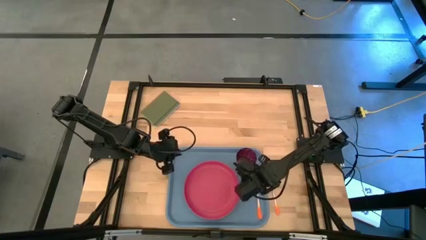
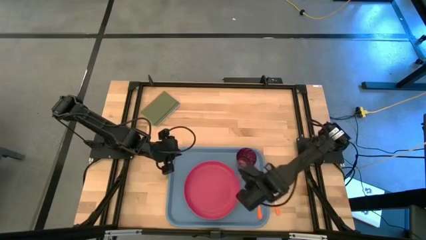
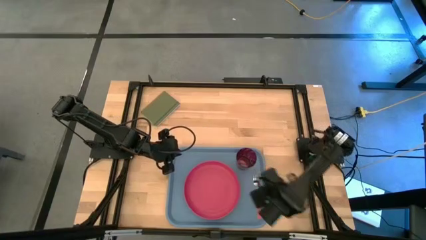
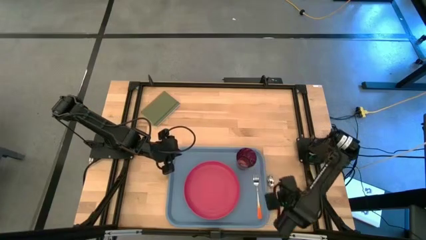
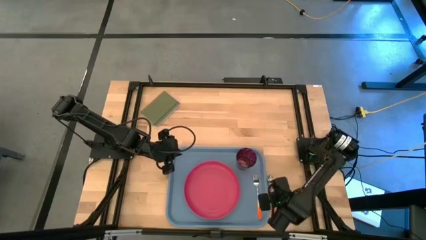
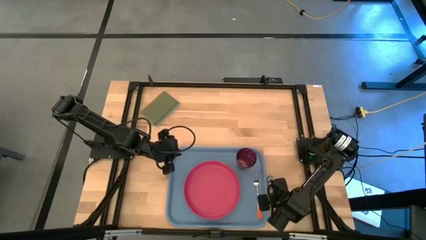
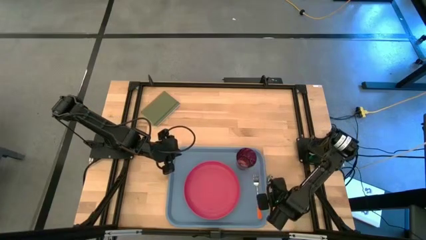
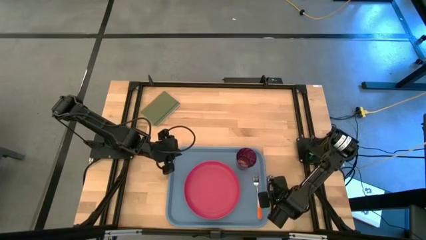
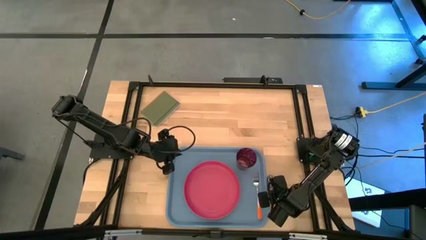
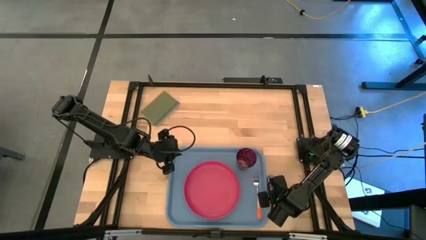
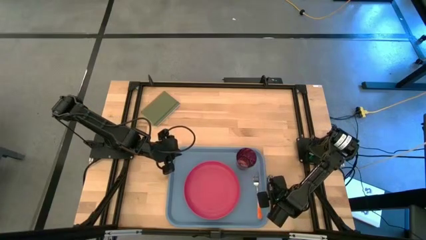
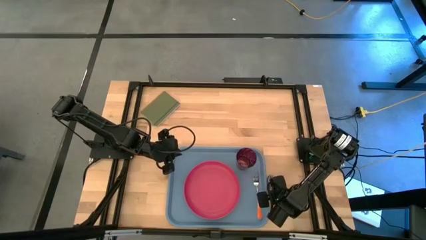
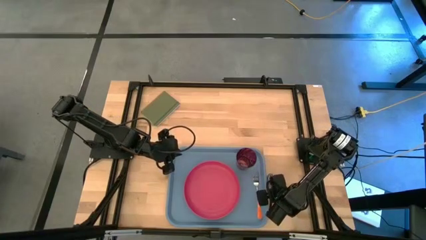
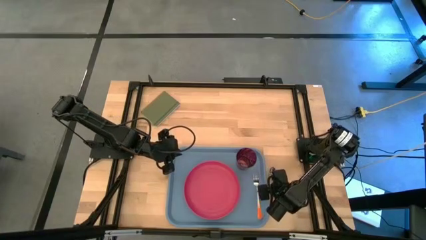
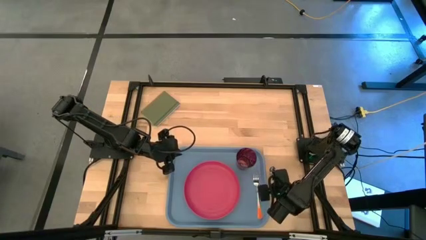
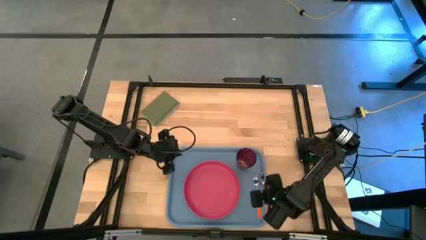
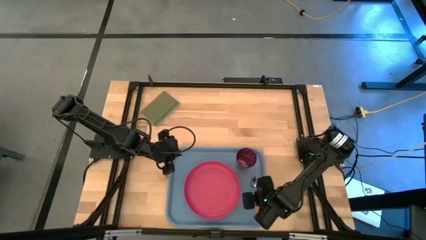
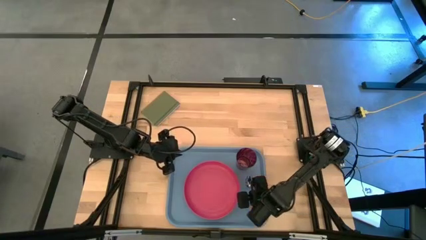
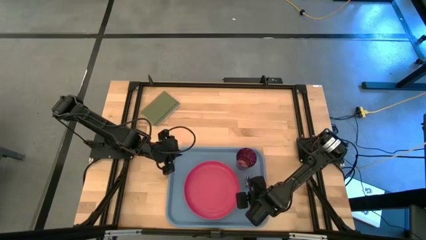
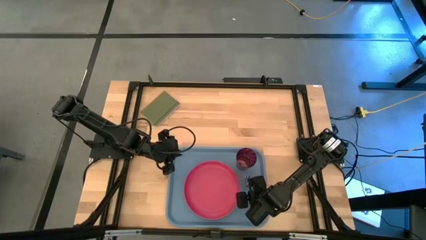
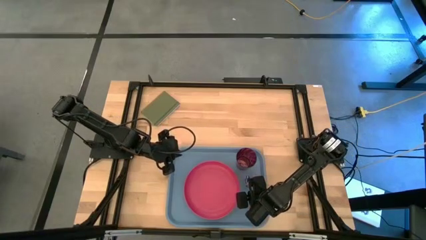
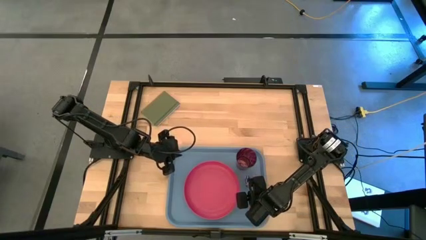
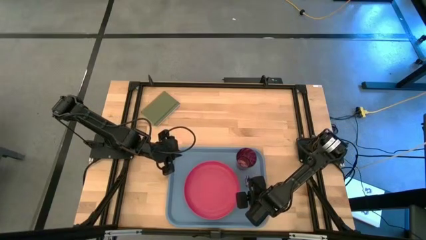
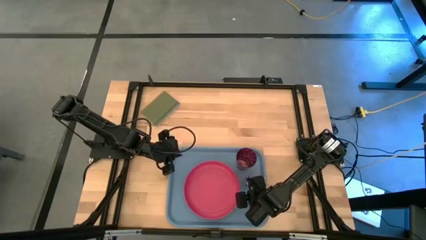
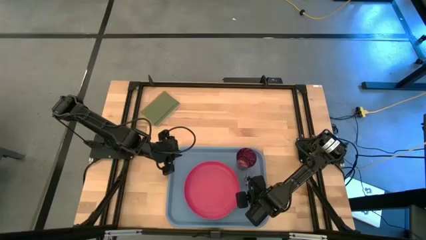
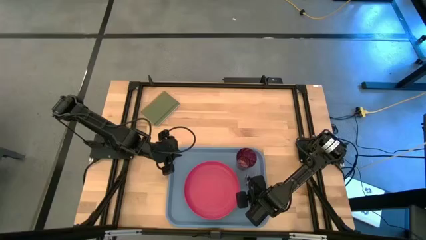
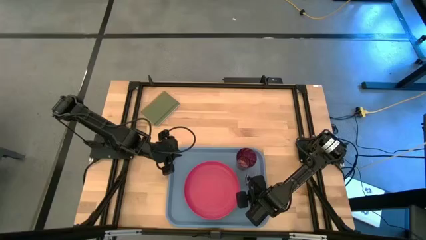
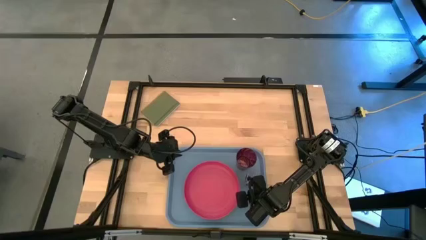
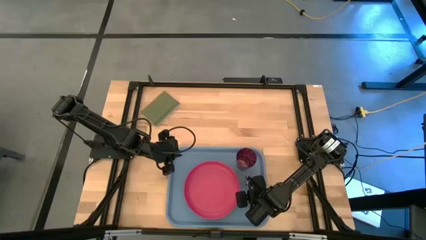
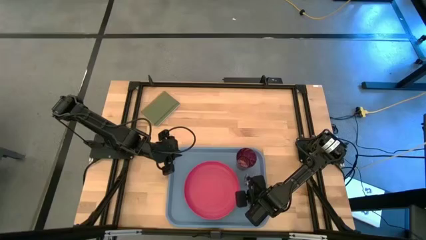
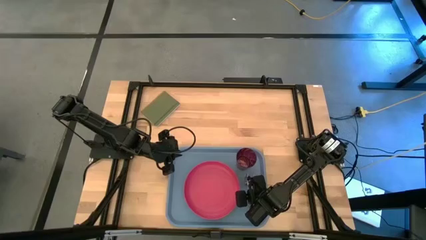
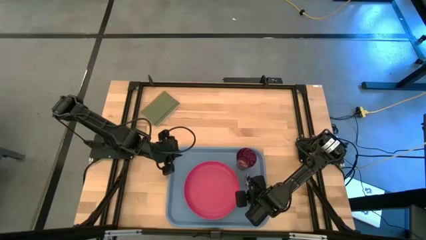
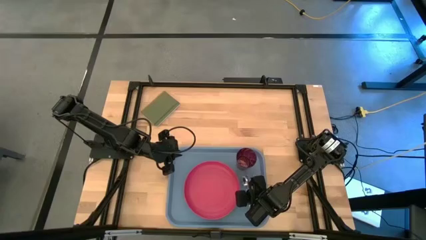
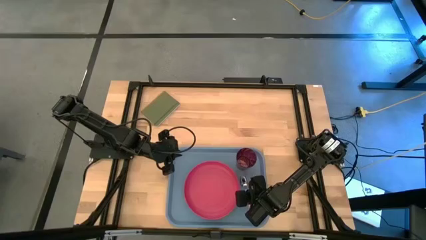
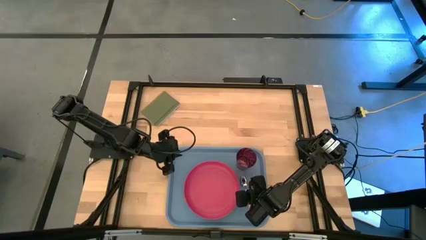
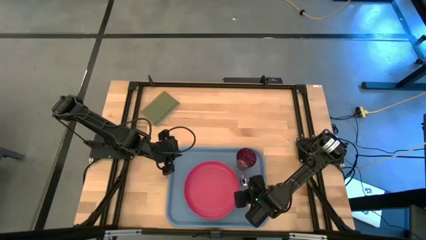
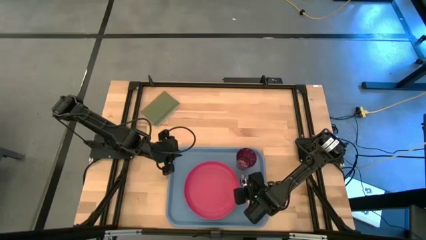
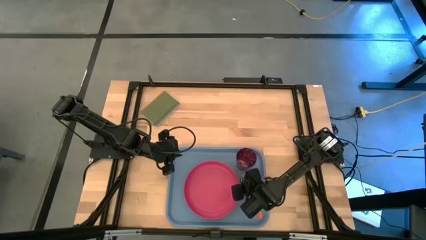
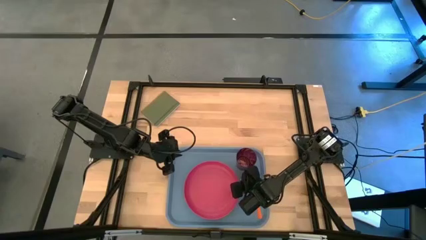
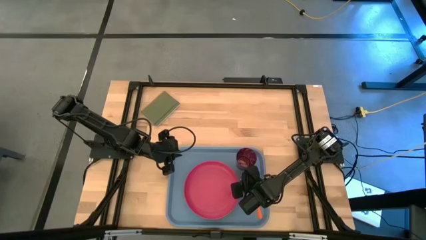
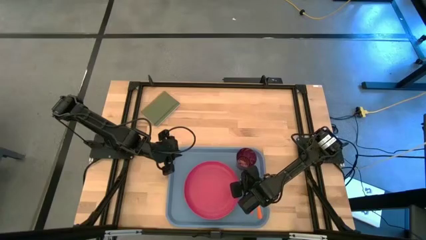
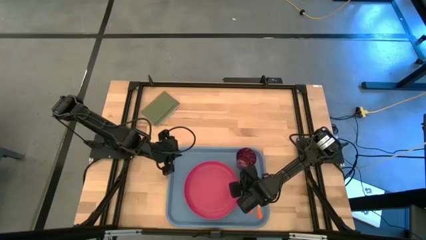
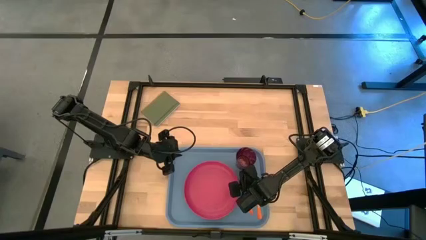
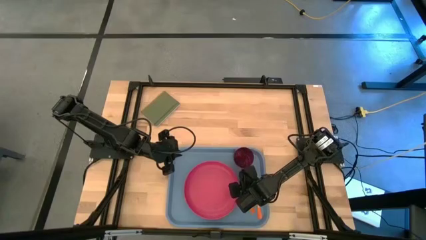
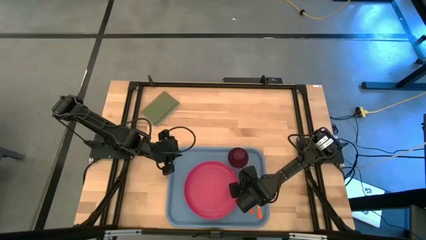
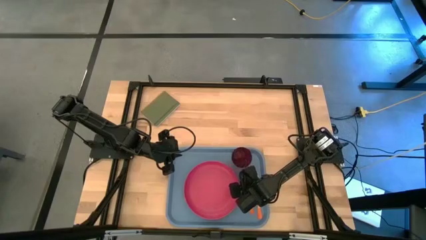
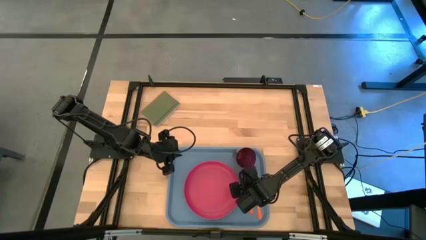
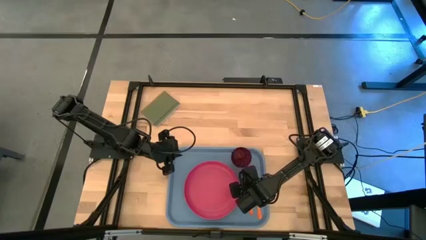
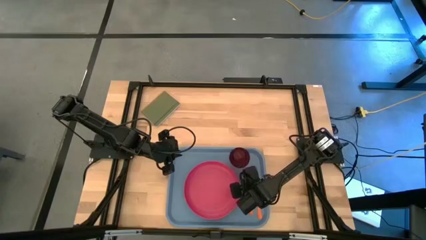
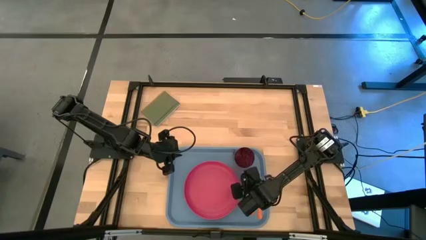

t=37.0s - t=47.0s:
Task: Pick and place plate/cup/fork/spoon on tray
Put the orange spoon on the blue tray to the left of the orange fork

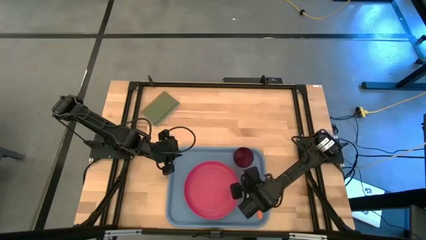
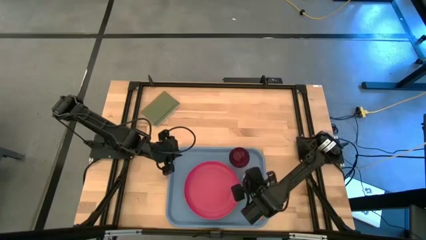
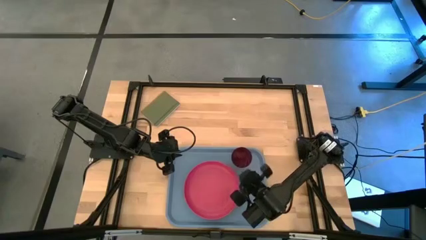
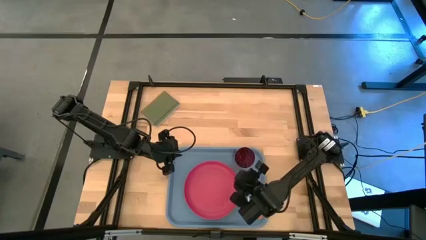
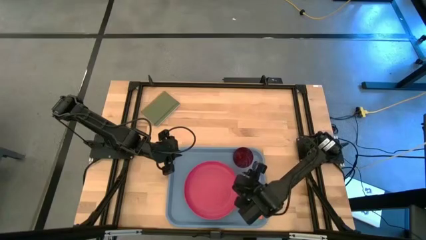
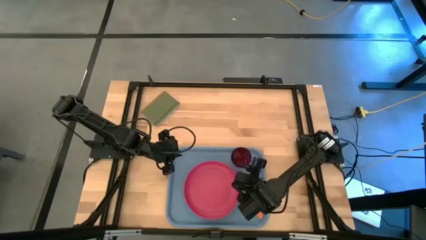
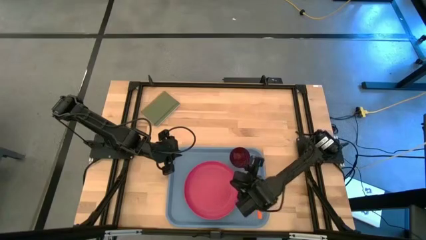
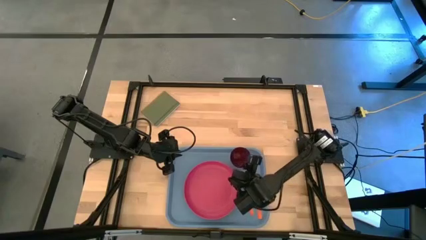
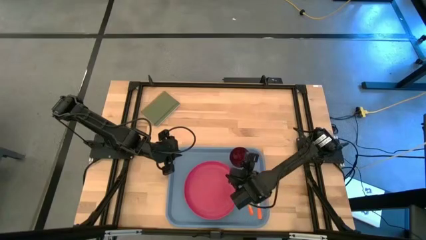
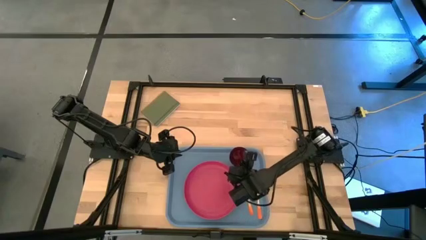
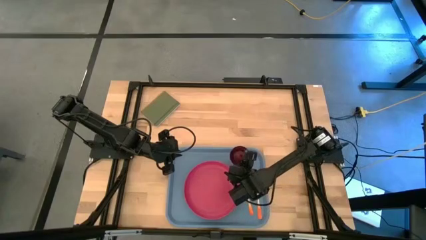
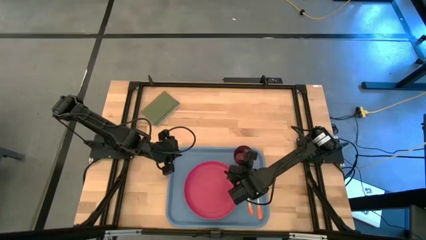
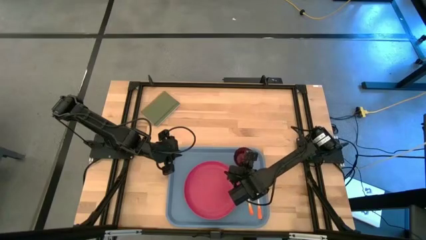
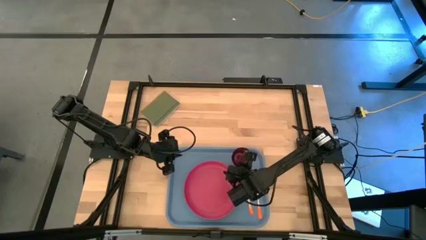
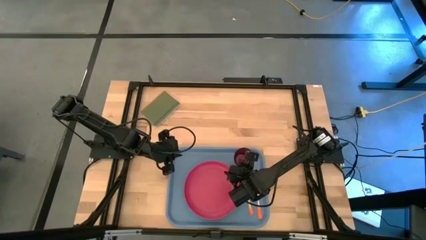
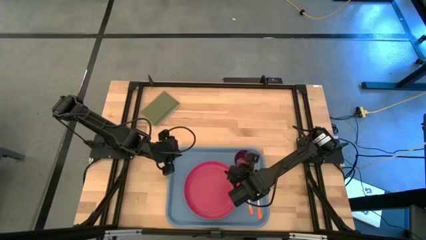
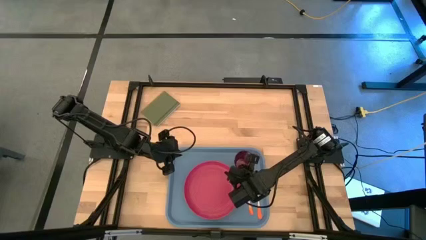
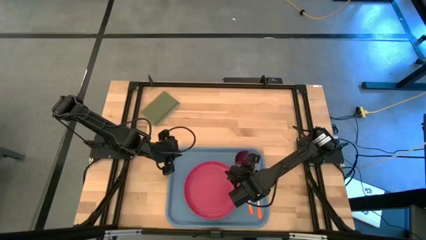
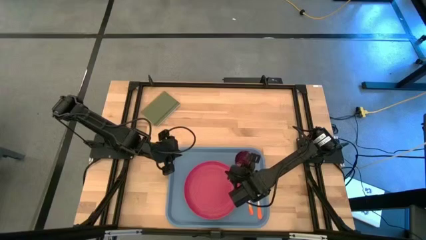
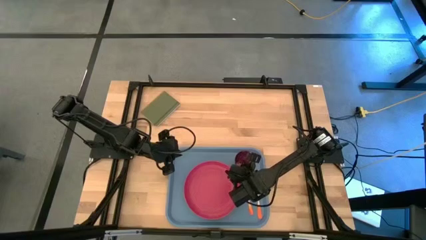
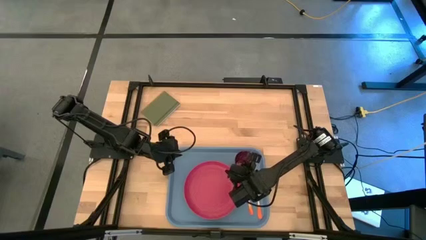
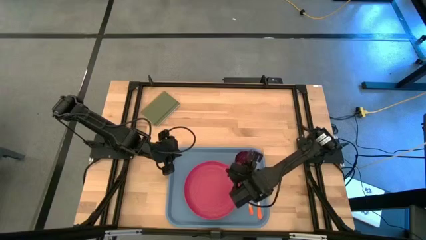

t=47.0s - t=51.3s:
Adjust the red cup on the blue tray

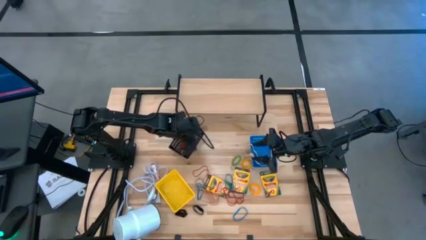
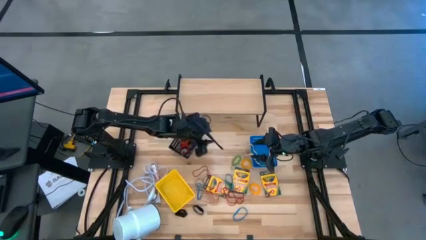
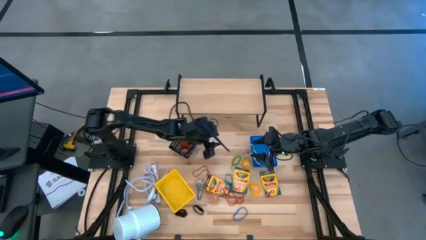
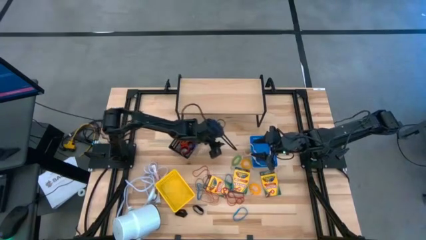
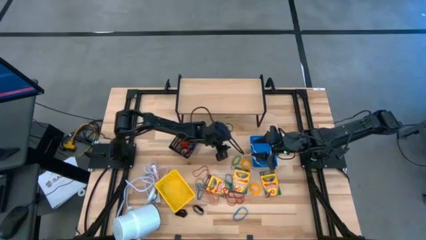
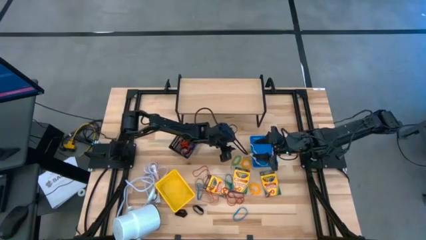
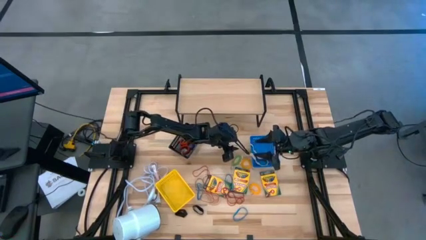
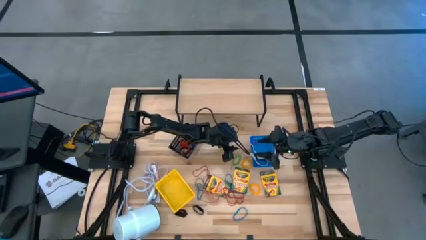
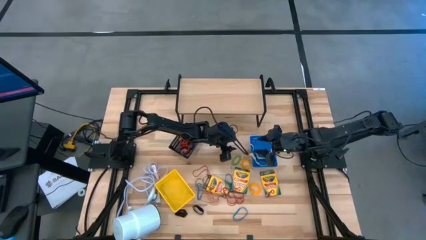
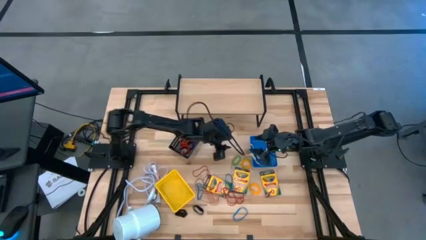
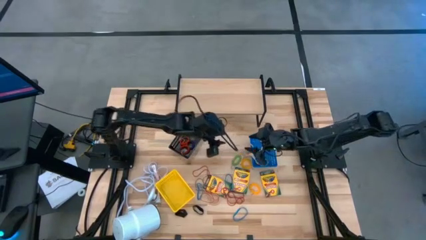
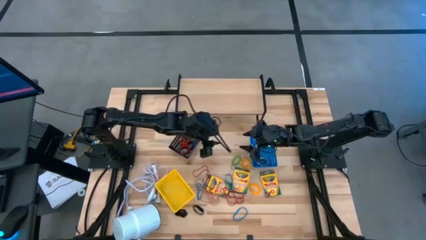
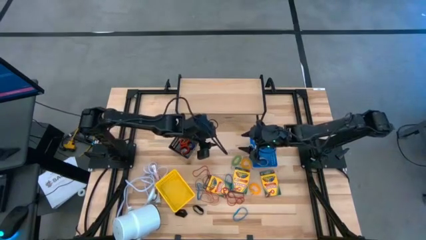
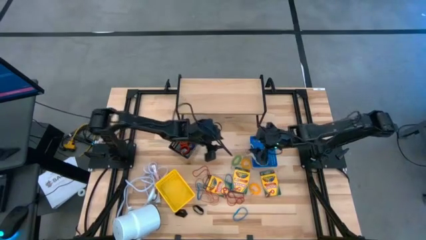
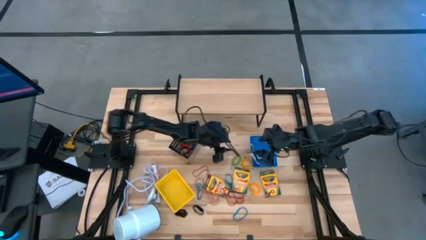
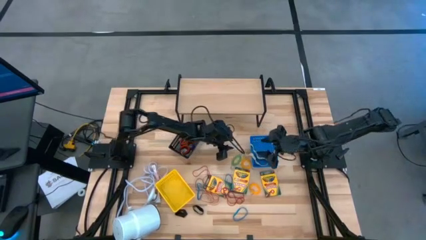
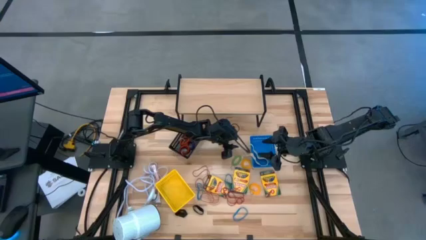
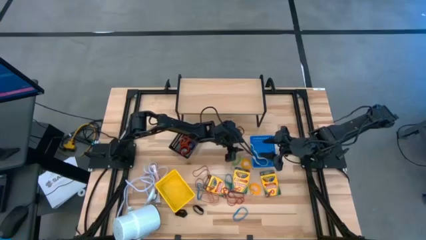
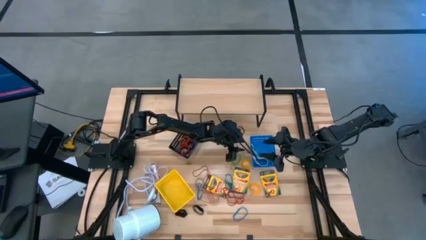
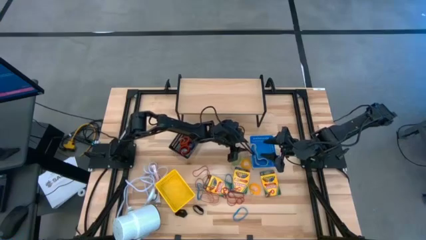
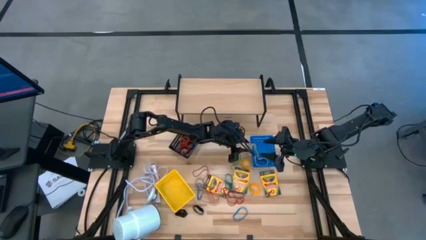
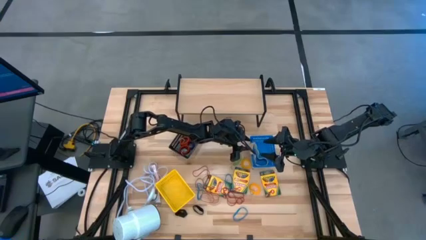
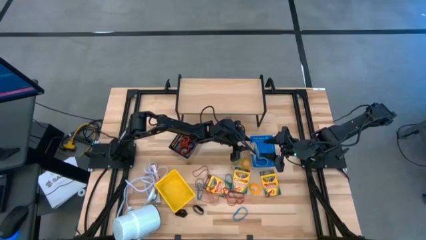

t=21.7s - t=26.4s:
Task: Pick & Place Office Desk Supplies
Put the white rubber band into the blue bin
